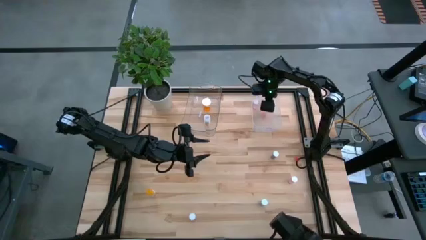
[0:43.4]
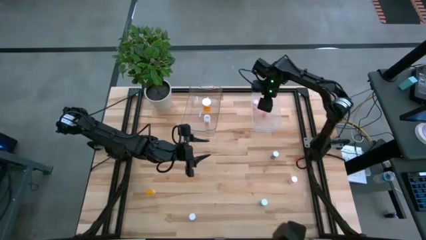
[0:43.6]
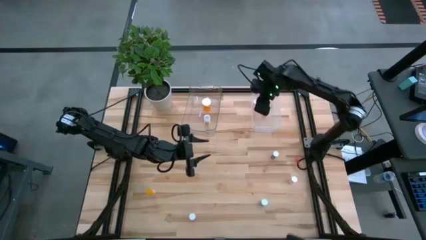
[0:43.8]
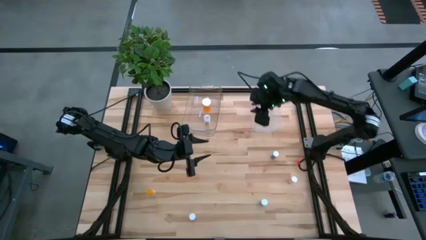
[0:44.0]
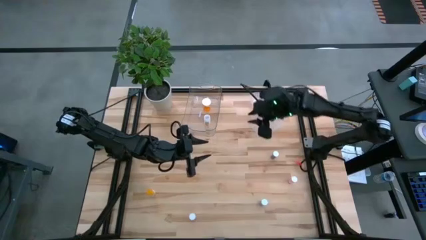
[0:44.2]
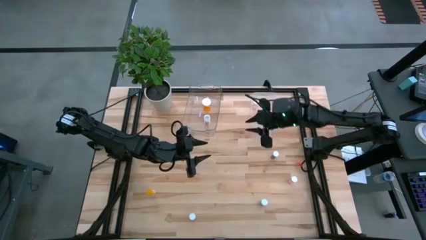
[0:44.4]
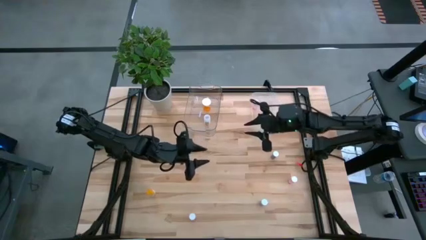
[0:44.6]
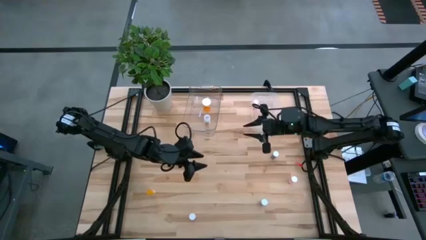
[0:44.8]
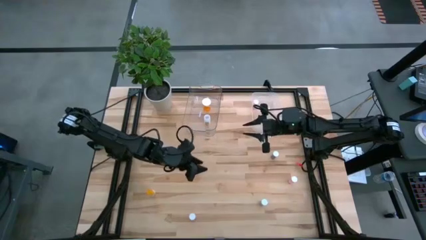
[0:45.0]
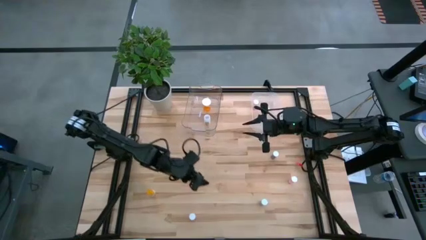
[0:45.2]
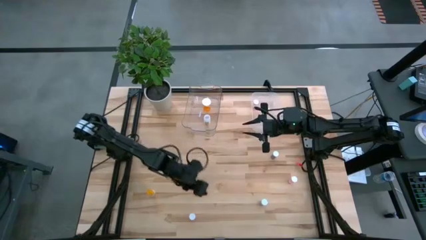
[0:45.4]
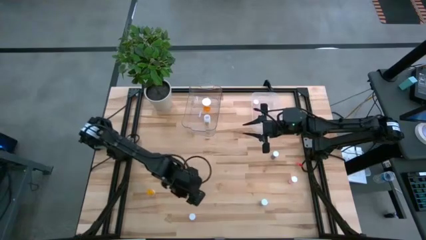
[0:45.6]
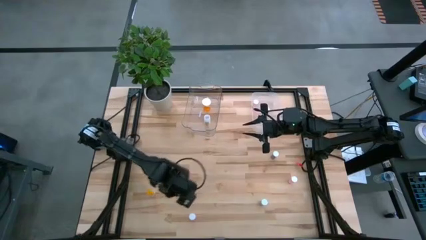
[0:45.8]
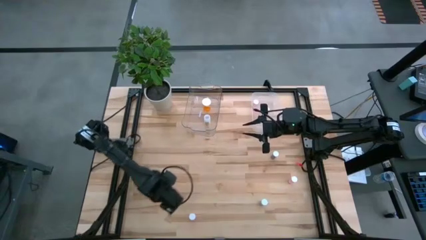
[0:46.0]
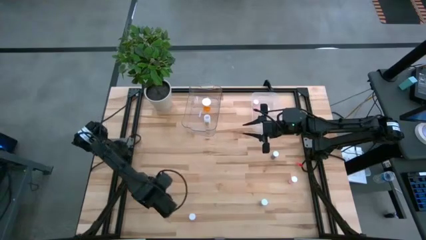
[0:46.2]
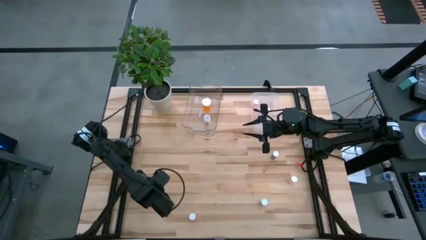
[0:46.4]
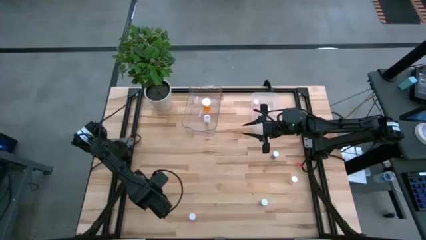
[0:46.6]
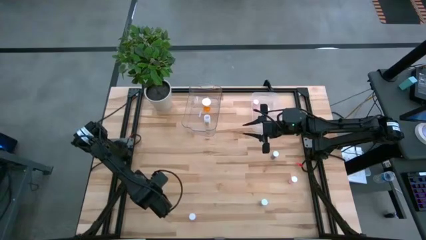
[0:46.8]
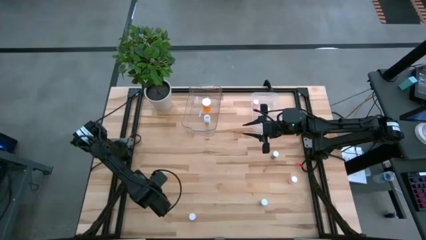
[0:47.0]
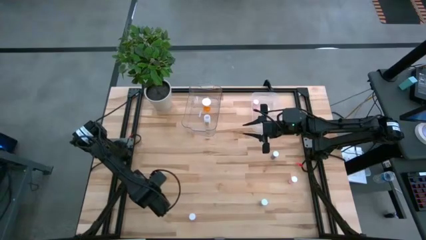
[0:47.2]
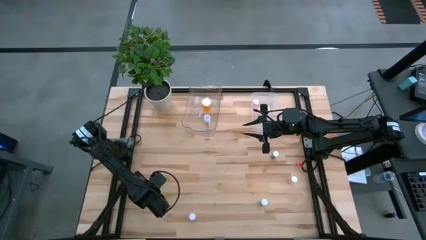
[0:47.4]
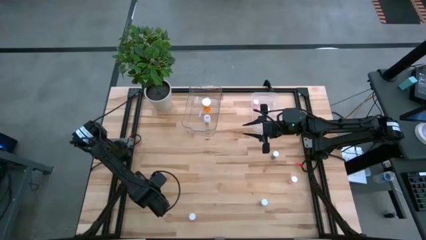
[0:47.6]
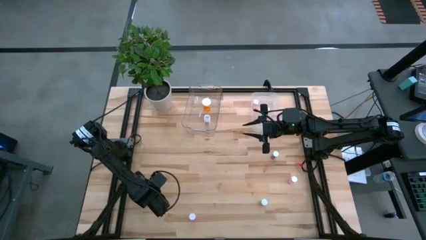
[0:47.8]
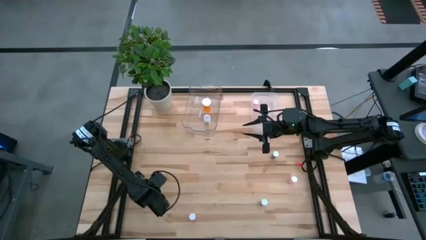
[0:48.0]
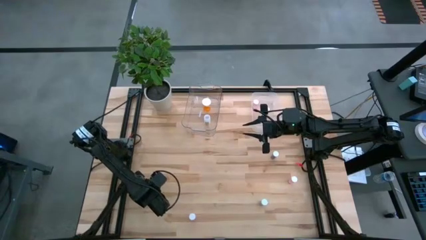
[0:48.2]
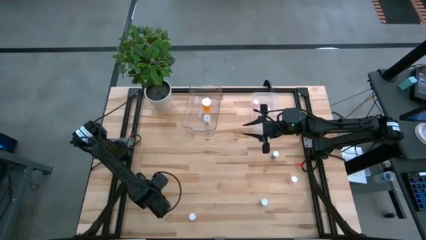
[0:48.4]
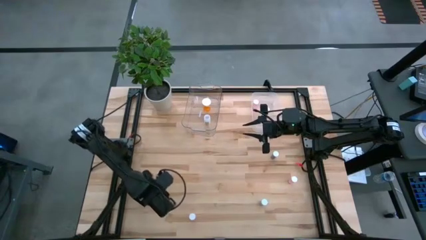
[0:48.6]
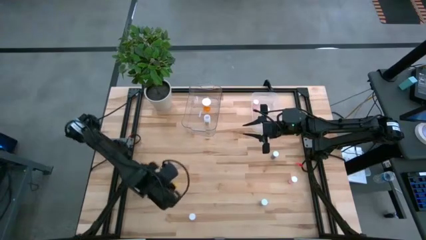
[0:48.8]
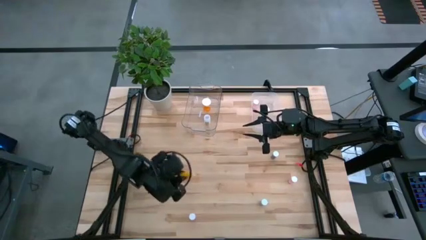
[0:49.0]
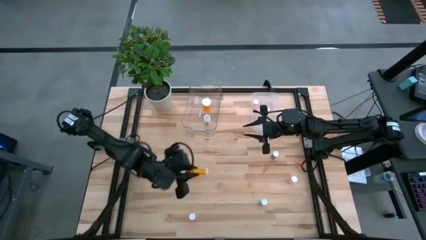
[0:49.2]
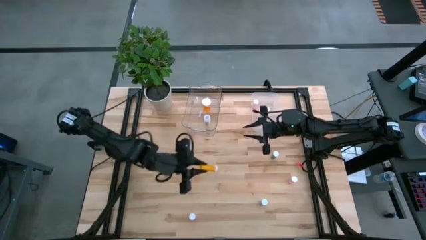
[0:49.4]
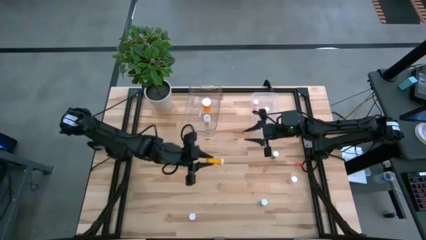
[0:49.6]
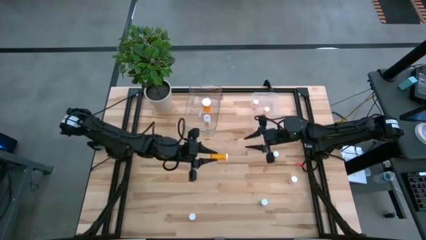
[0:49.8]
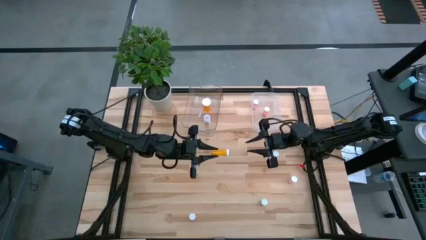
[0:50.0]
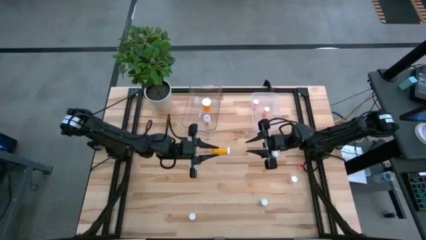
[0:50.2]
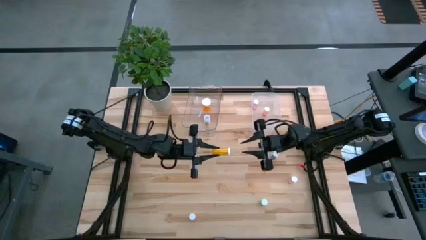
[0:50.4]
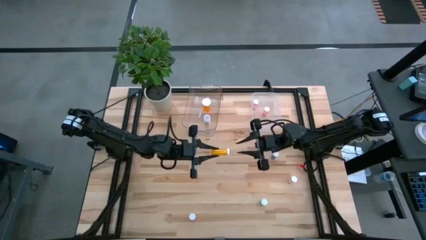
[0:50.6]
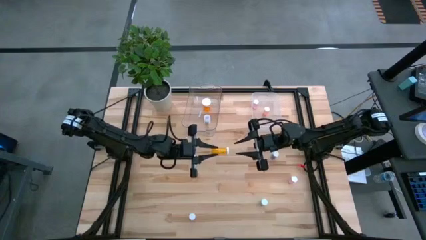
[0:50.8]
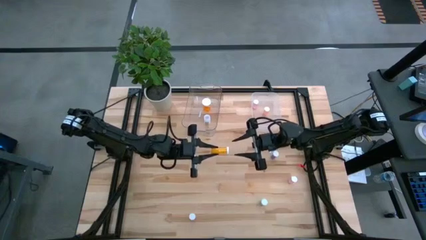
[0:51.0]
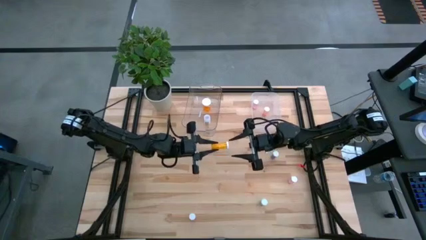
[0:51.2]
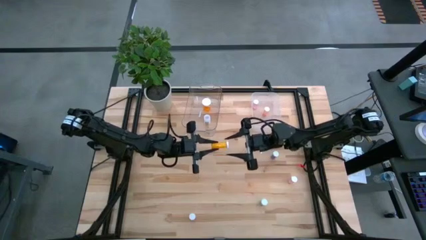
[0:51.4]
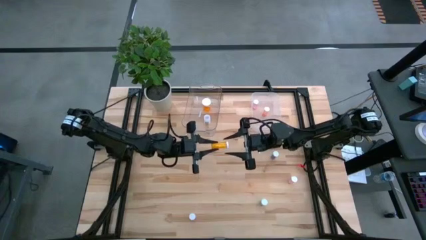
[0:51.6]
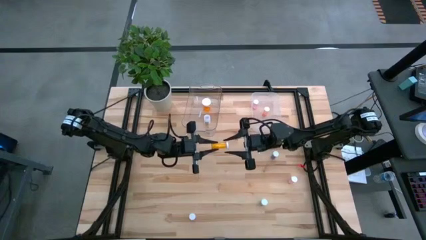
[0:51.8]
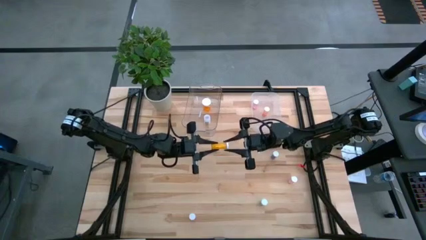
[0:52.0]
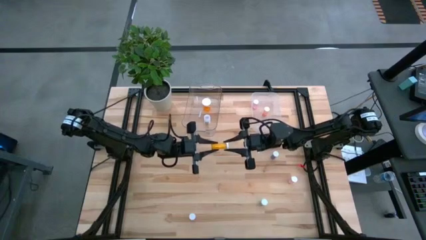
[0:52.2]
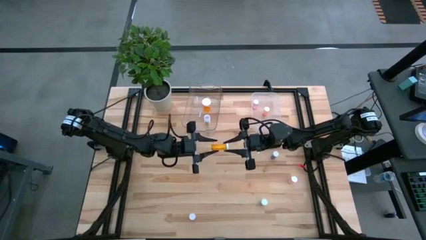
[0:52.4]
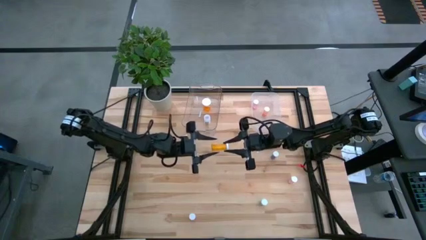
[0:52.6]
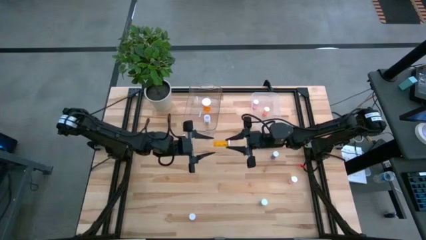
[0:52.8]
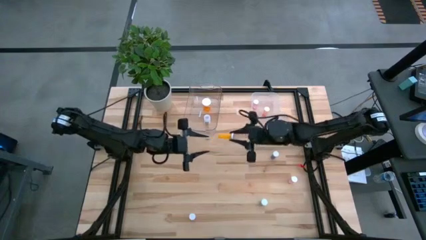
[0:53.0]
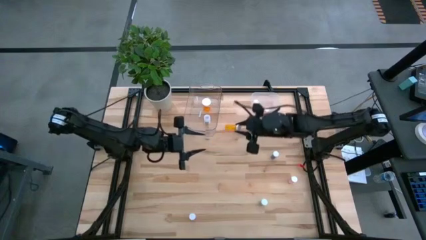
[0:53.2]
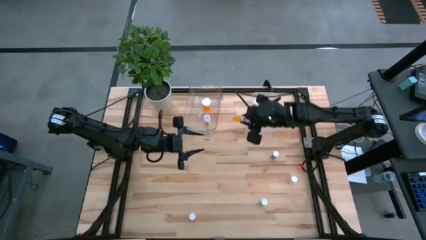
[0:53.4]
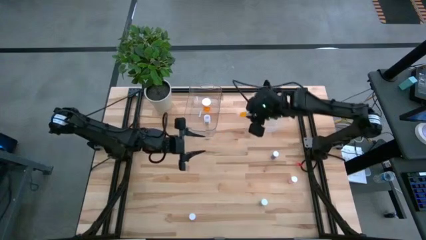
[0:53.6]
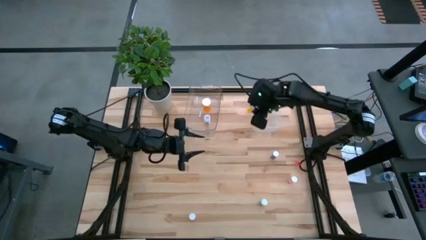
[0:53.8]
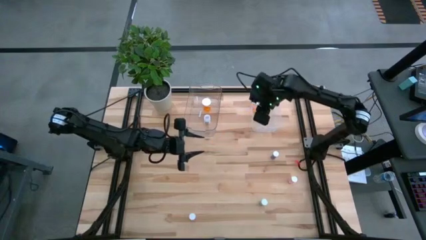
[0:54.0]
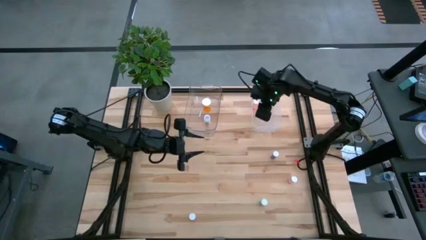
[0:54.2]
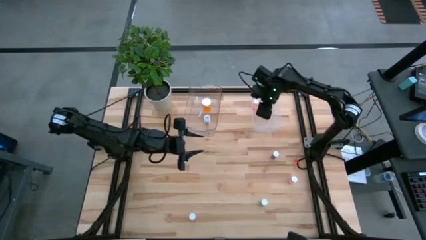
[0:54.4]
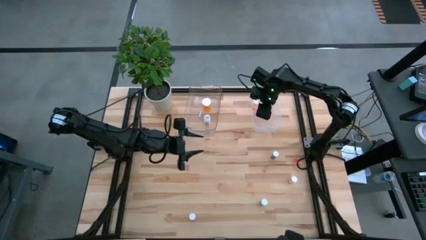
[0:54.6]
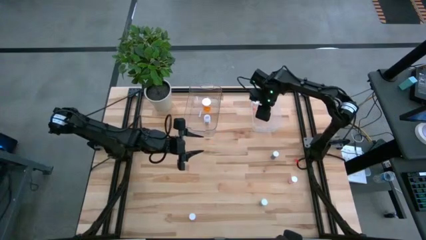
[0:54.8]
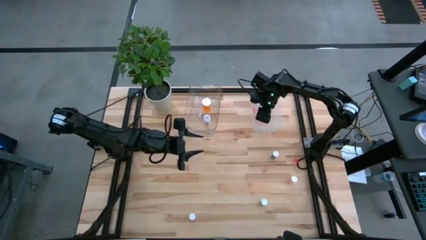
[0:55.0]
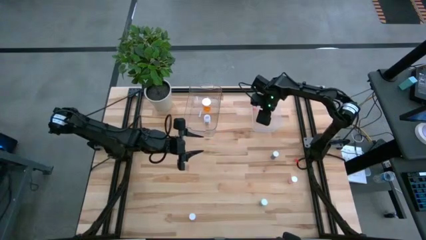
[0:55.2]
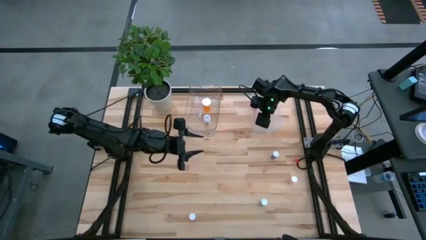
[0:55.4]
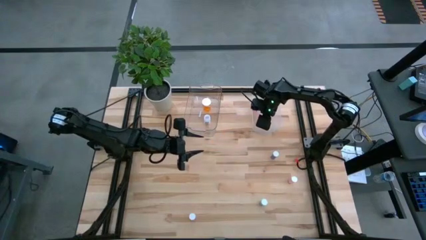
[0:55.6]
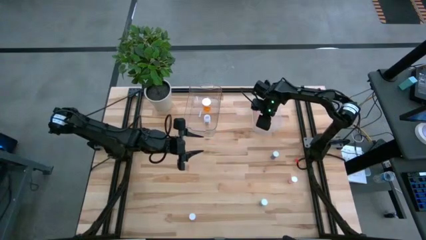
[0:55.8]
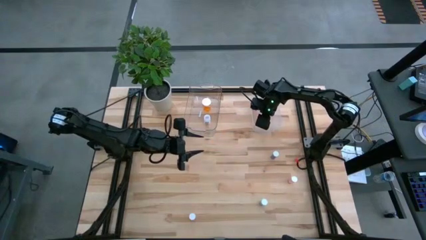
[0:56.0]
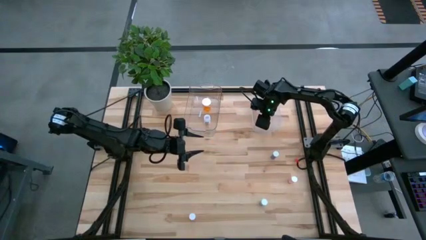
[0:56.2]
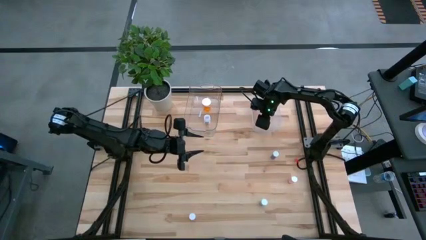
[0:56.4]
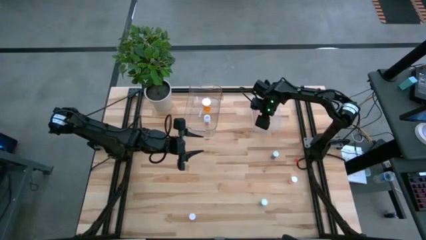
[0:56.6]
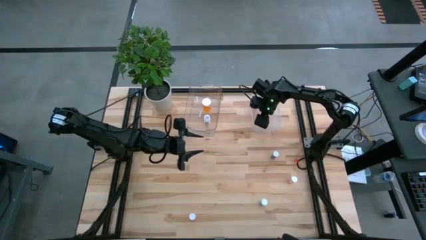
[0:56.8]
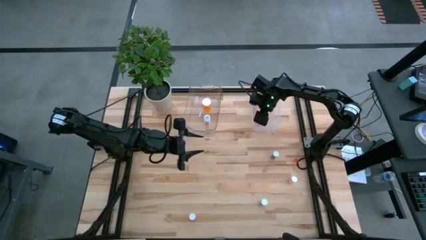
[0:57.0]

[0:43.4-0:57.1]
Task: Pick and place medicine bottles into bin by pill shape (circle, oval)
Put the orange tablet pill bottle into the right transparent bin

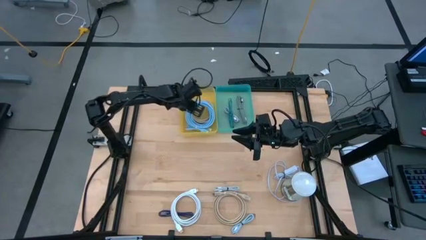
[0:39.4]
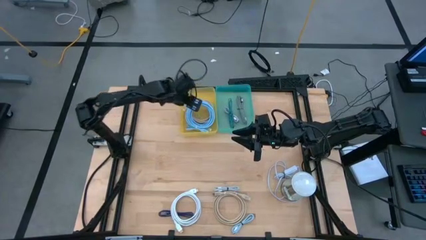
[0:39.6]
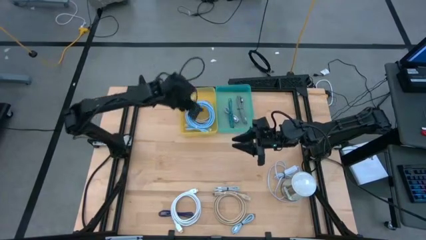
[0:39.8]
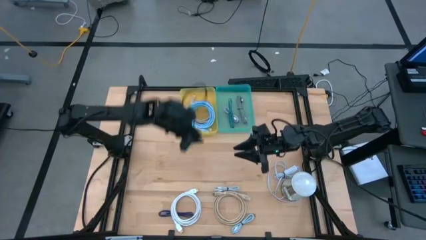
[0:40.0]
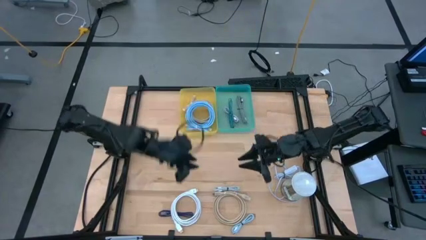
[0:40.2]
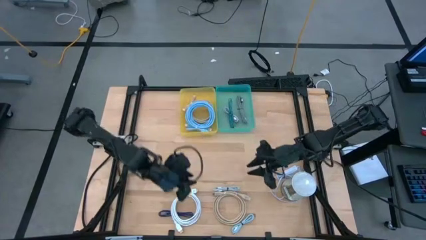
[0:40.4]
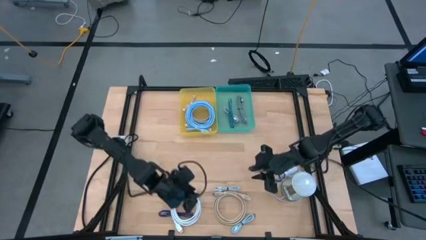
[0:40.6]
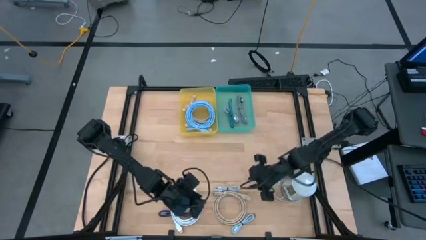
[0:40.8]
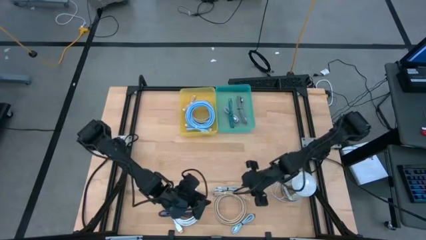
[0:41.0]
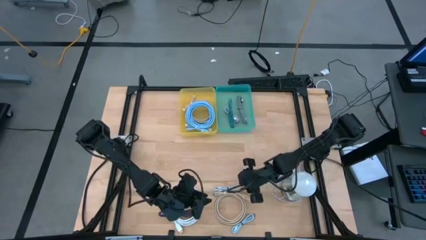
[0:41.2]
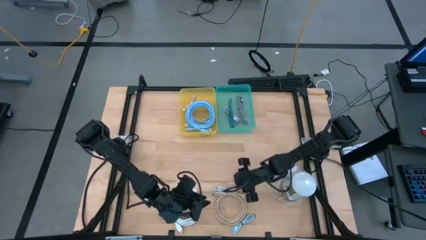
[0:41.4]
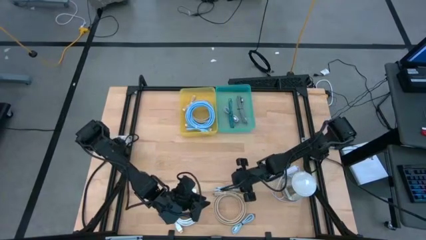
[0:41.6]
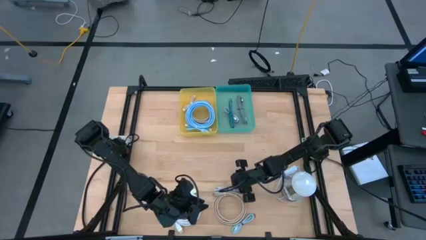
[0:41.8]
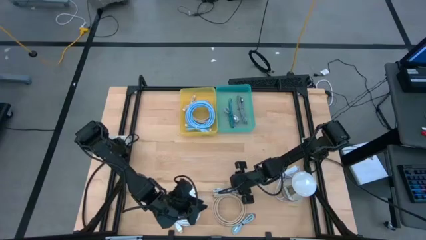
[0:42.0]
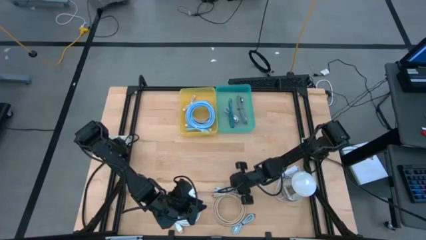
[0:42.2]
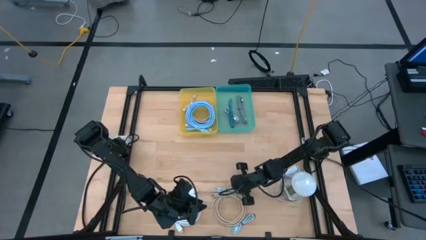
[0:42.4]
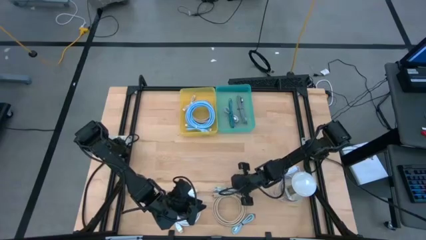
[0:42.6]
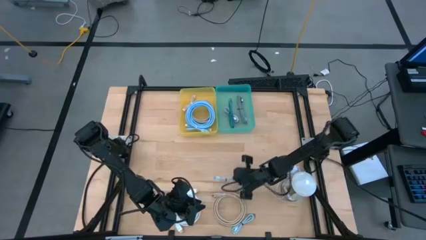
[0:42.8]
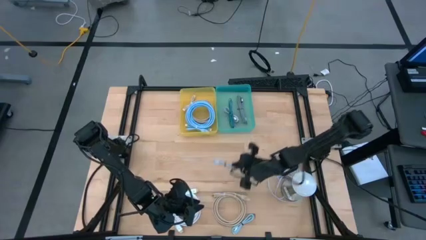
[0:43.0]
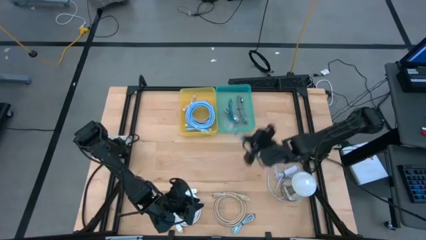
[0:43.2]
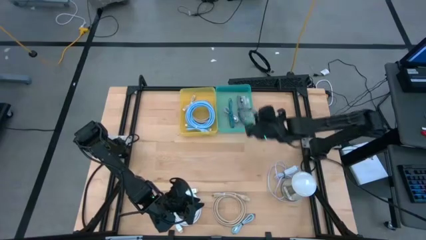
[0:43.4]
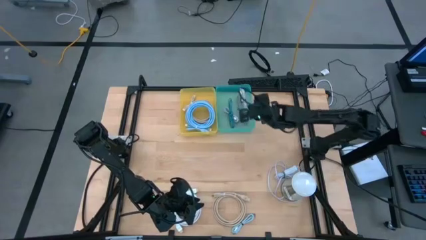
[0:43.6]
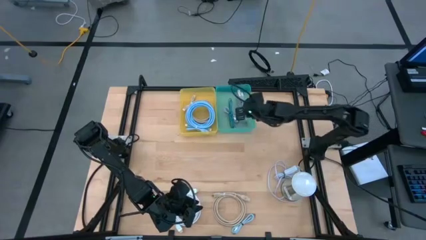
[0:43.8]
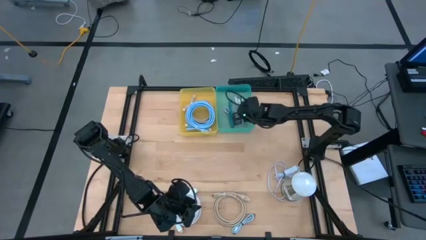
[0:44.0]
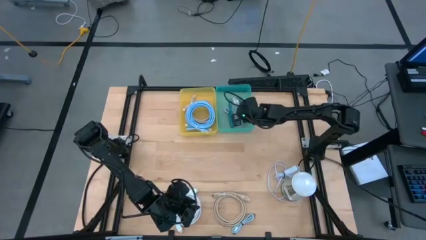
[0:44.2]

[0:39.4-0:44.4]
Task: Pick & Place USB Port
Put the gray charger cable into the green bin
